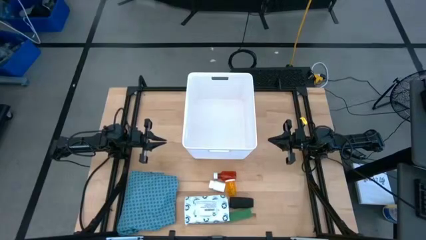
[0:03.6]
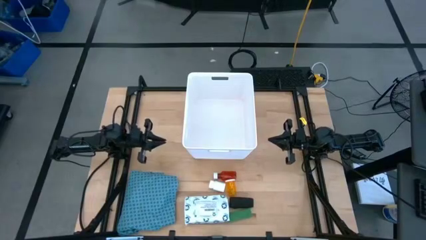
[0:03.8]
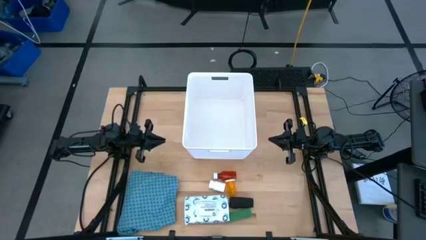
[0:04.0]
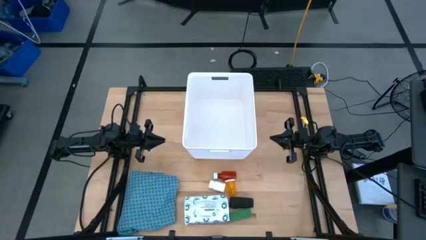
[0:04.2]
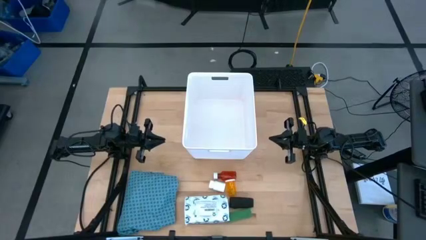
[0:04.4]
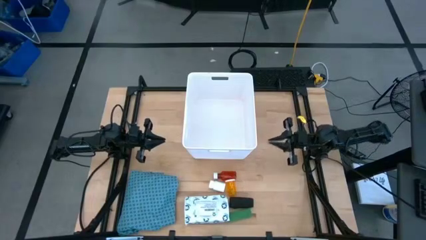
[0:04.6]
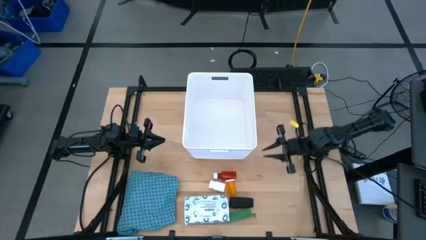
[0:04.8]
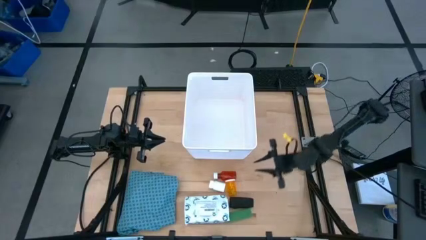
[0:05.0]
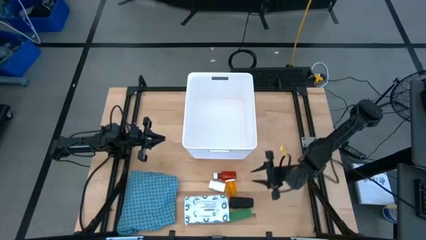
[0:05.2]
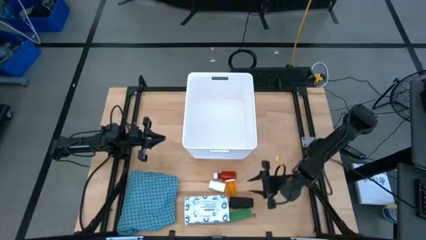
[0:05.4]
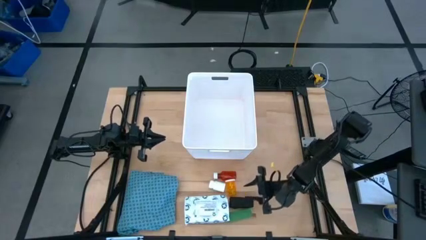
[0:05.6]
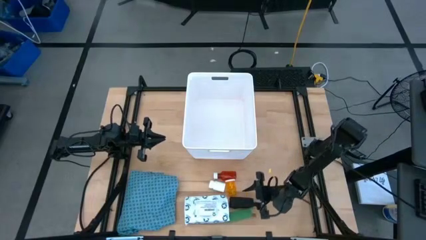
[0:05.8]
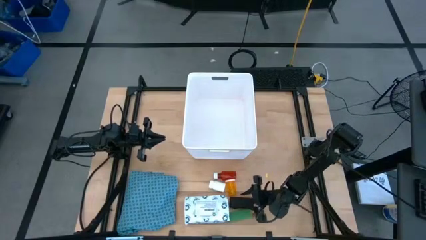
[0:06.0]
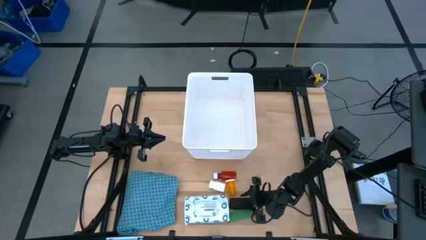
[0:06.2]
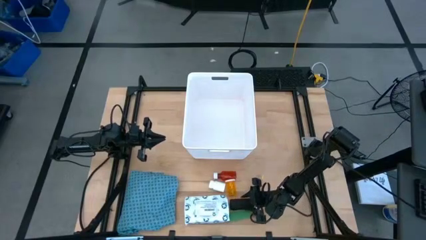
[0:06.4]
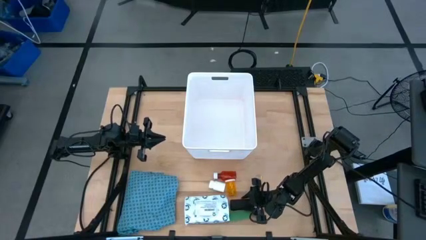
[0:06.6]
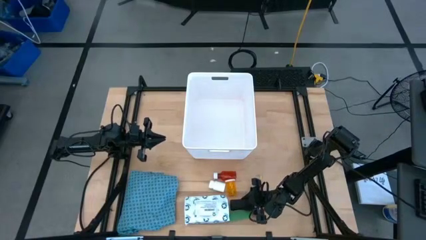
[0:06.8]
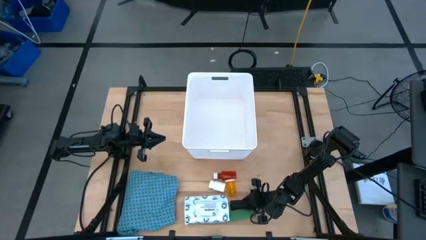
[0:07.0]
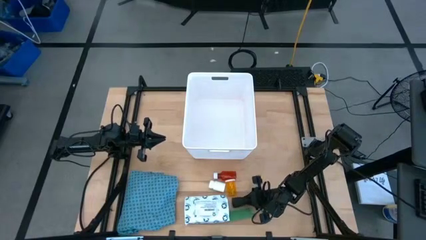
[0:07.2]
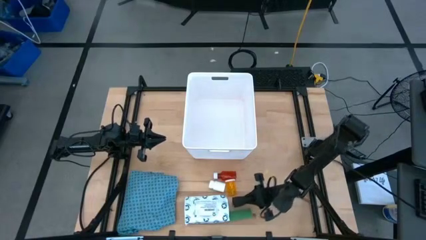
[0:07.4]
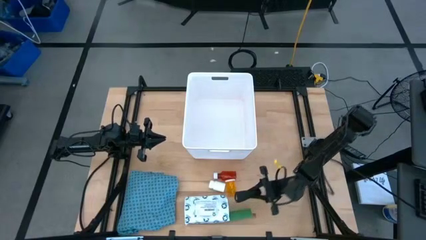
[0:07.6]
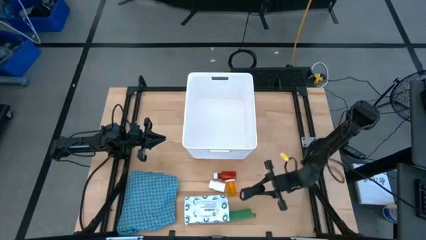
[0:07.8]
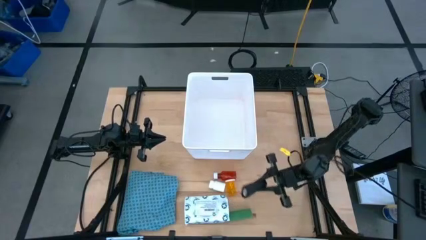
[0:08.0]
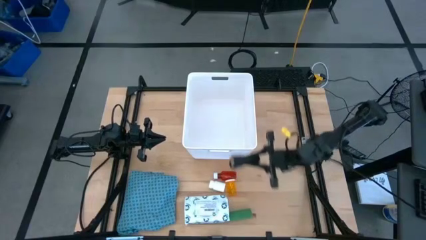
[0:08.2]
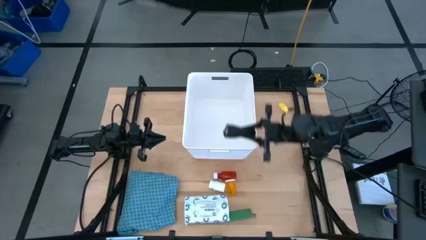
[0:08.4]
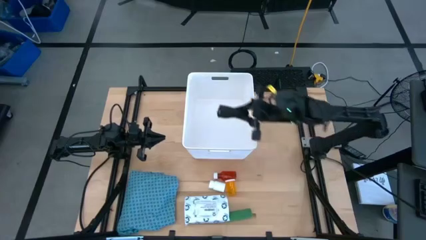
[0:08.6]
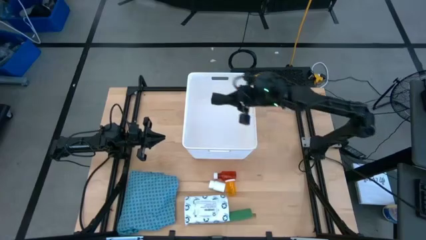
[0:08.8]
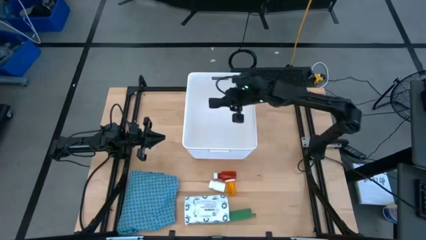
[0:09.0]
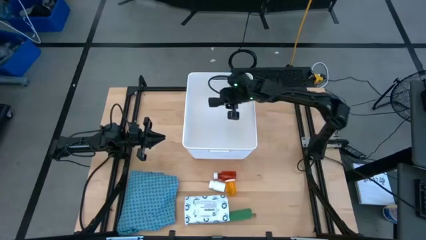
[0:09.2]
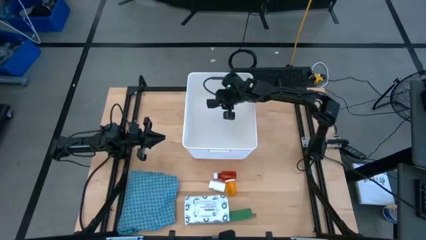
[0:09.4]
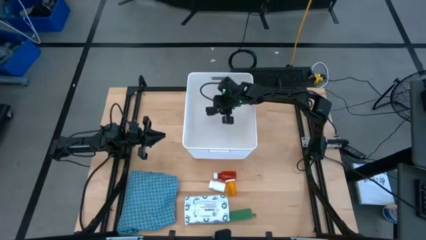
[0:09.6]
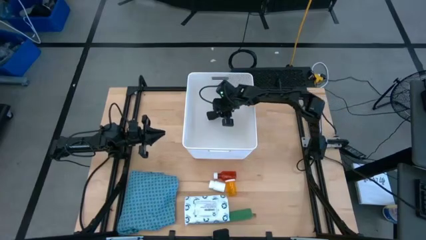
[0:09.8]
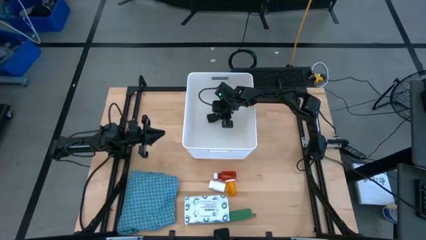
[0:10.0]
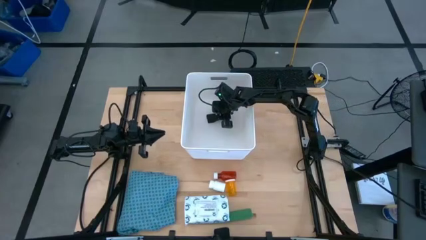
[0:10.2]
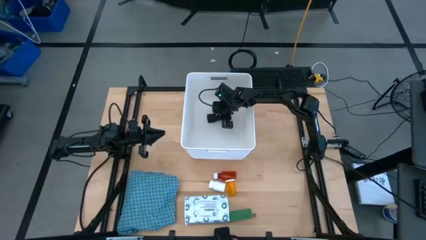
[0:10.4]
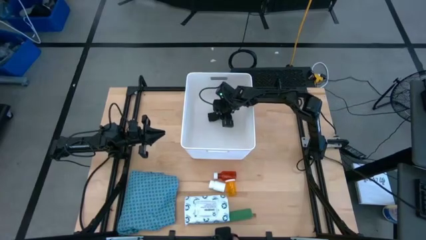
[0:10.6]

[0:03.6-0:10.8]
Task: Pick & place medical supplies in basket/bin
Put the black bandage into the bin

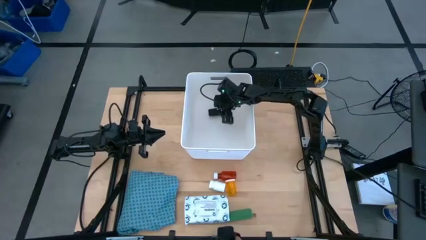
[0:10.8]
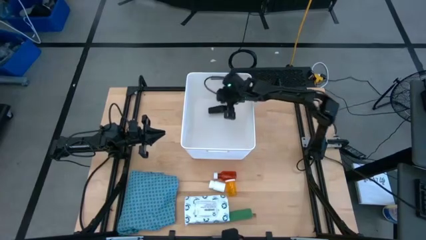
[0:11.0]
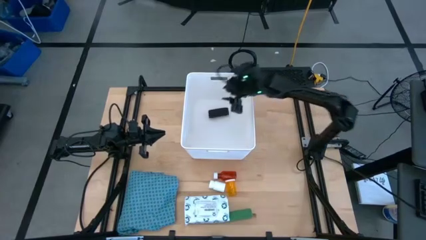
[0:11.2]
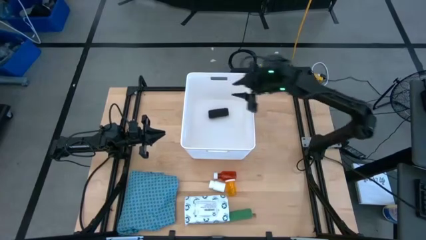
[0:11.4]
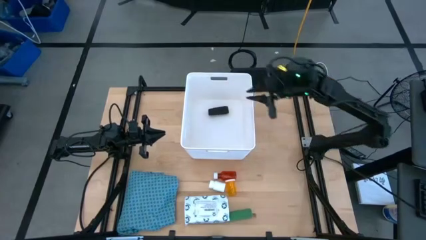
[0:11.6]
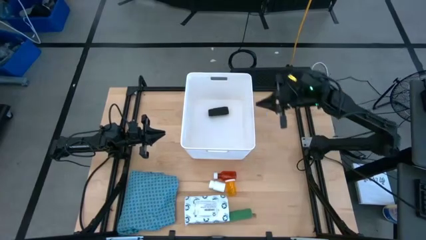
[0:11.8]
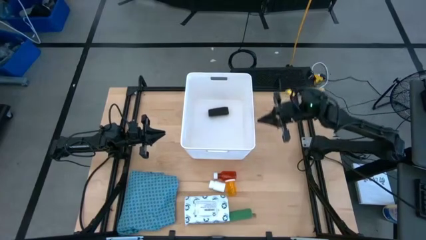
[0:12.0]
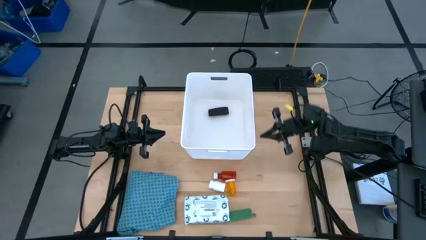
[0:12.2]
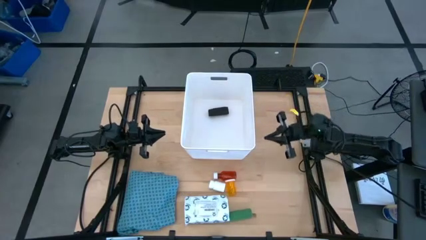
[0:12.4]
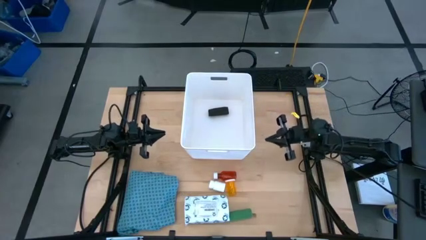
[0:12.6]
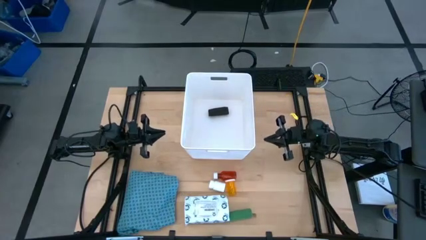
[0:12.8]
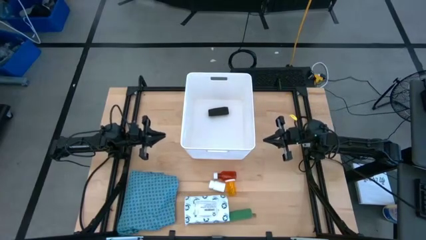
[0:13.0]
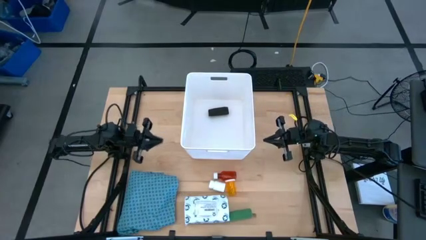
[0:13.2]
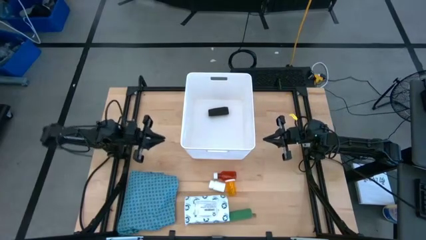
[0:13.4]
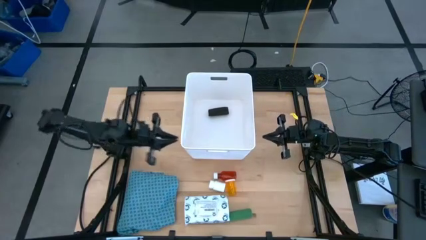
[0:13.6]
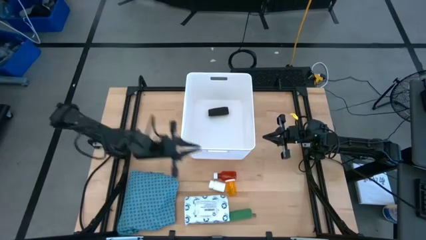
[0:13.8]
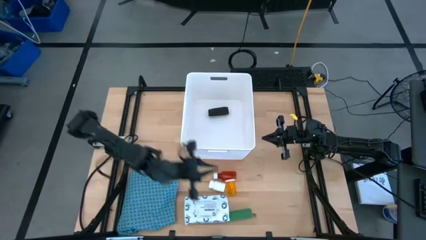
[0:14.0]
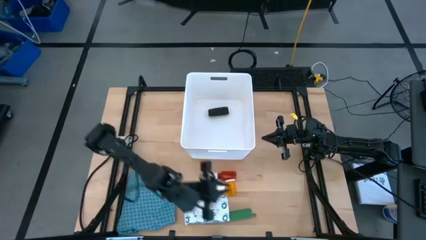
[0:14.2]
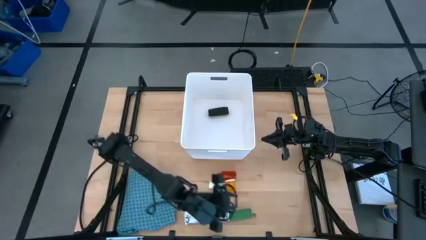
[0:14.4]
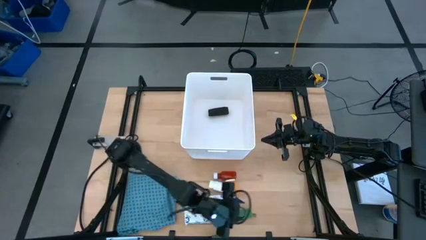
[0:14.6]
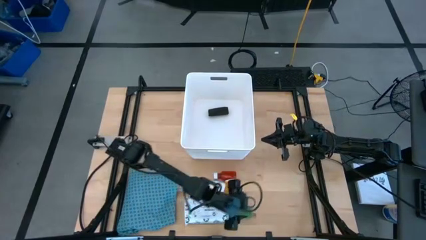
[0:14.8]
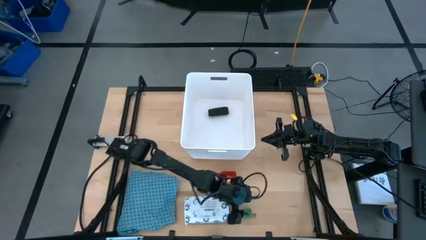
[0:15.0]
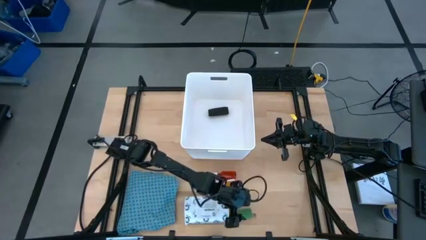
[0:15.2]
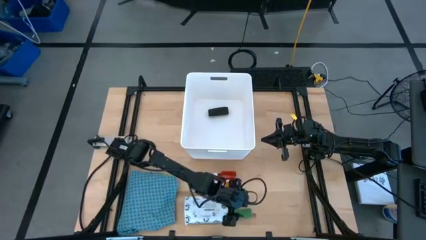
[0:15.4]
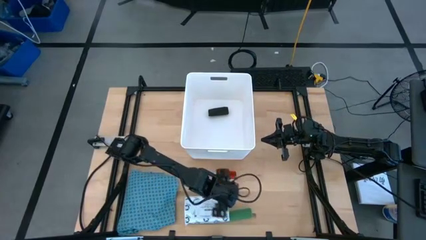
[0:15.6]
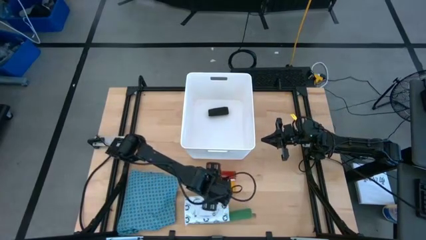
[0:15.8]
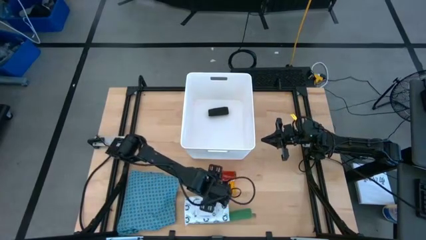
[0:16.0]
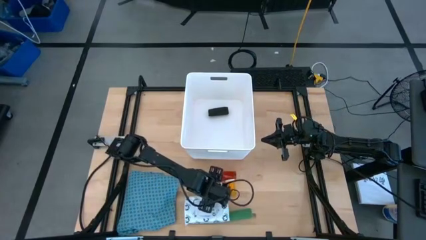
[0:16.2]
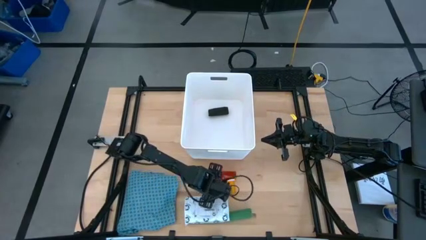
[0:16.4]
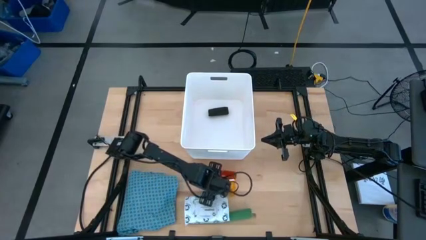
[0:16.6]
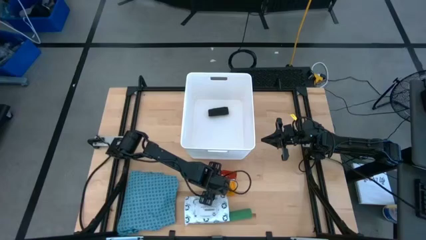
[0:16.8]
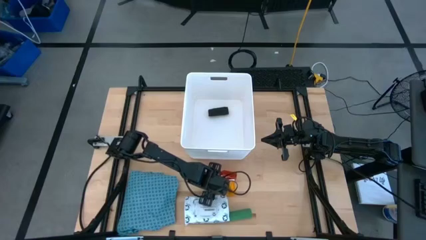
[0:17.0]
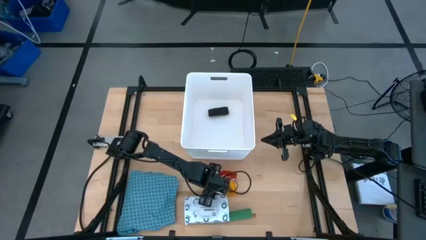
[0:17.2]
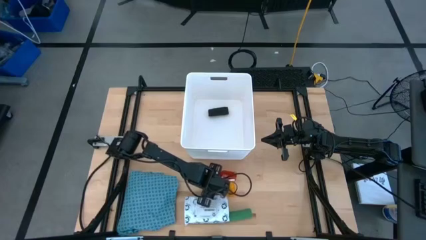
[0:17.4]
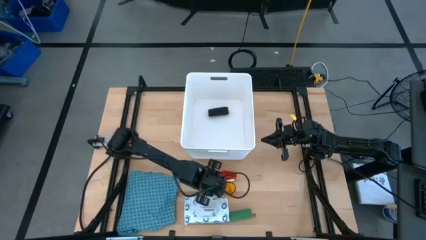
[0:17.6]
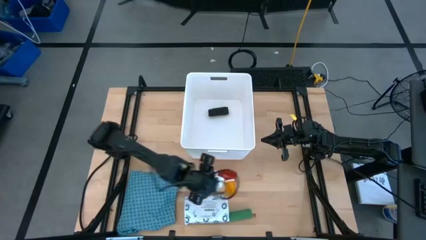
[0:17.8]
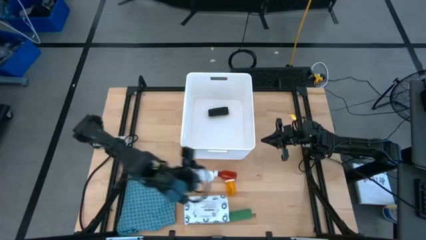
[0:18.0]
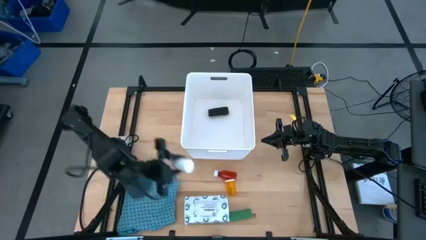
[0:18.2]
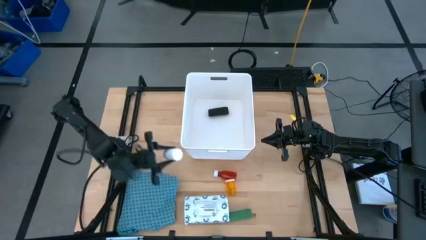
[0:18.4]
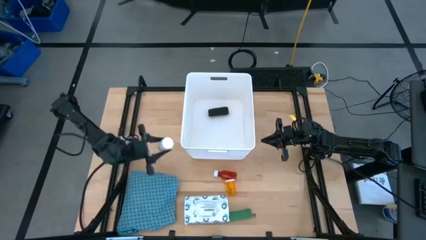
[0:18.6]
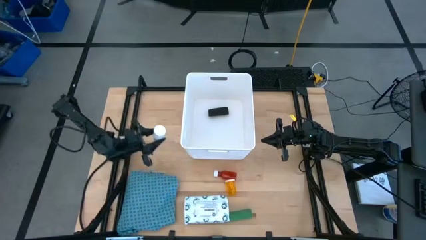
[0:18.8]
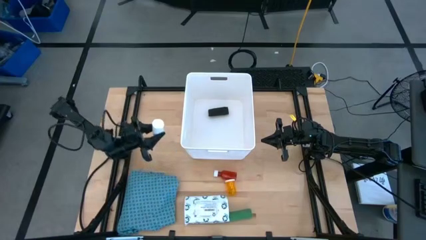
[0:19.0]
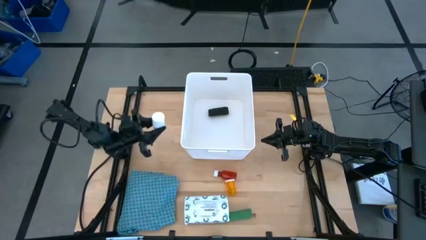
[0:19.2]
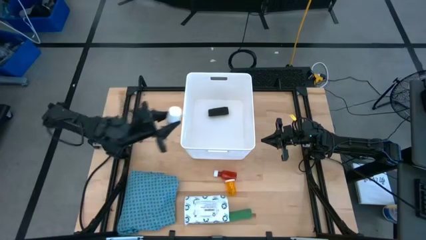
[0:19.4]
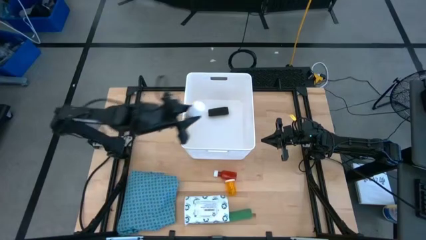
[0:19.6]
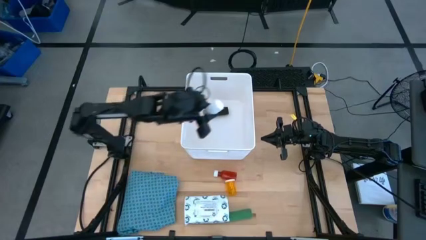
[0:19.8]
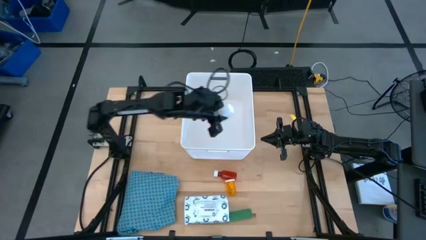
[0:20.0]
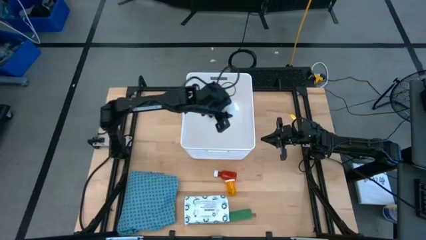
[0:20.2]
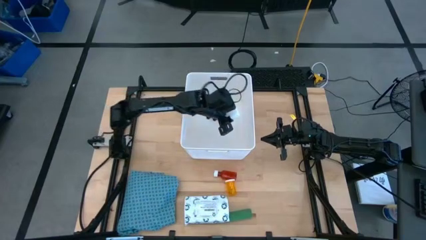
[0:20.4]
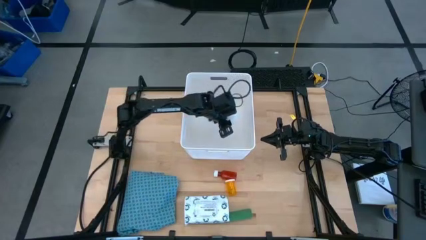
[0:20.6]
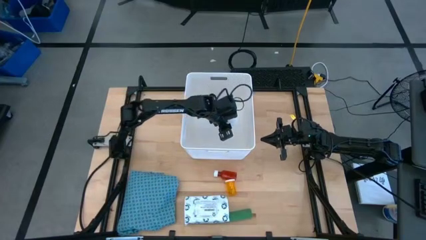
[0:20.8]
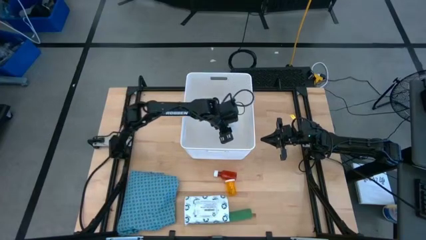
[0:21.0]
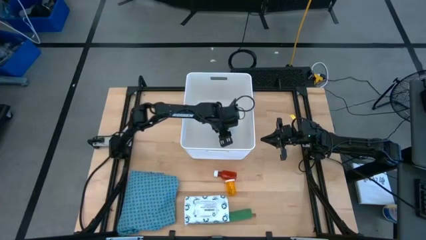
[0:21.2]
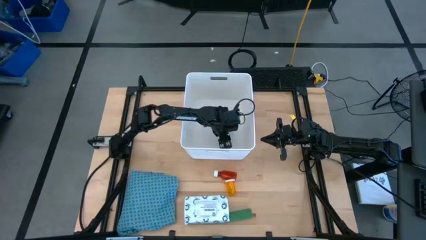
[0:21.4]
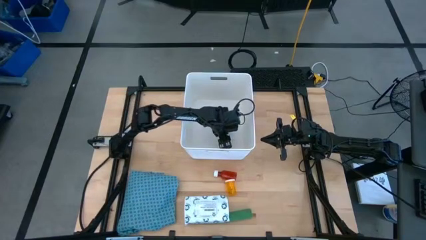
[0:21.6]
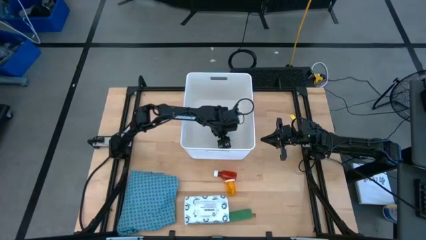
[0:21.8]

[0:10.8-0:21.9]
Put the white medicine bottle into the bin
